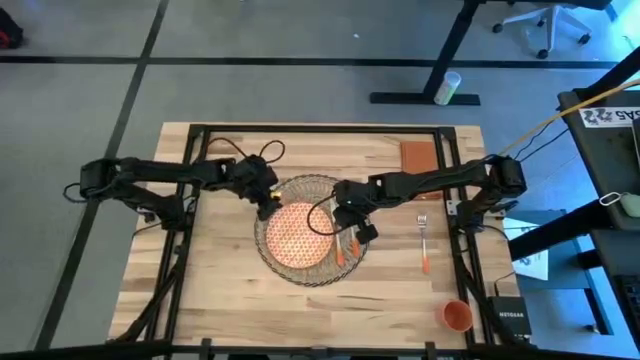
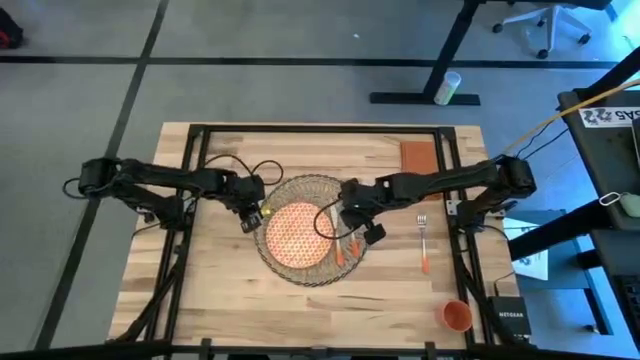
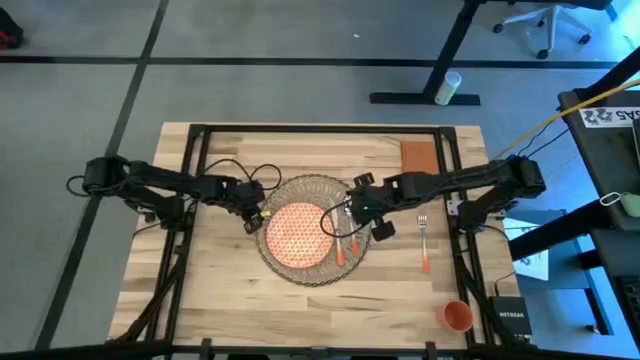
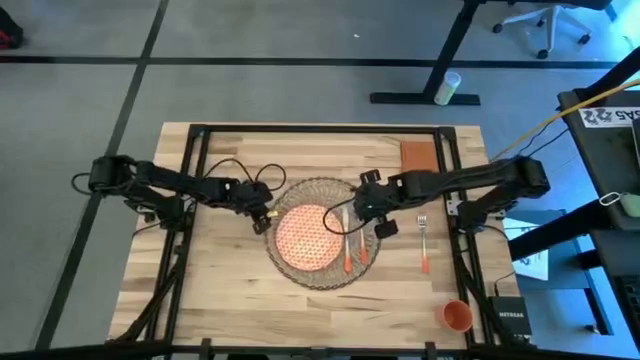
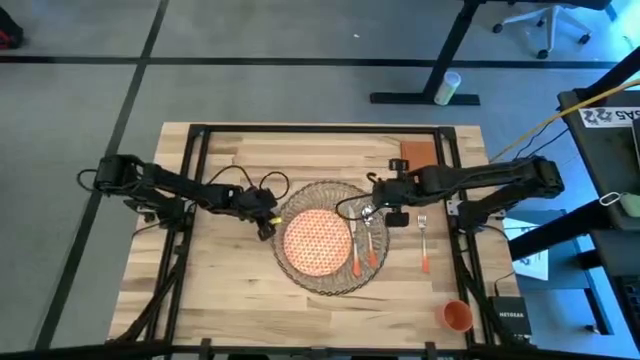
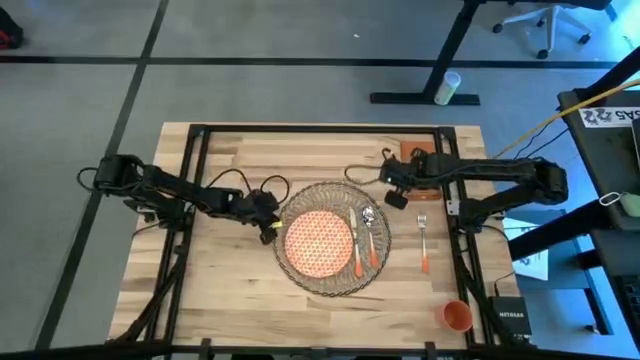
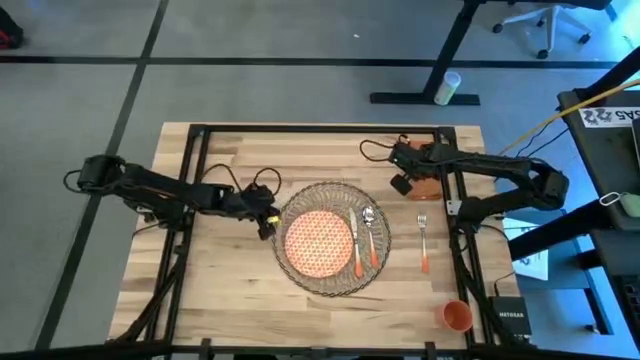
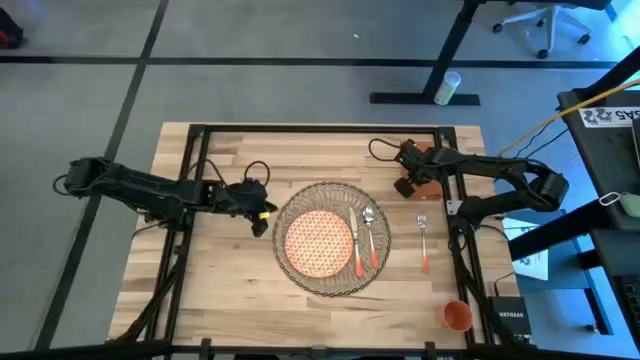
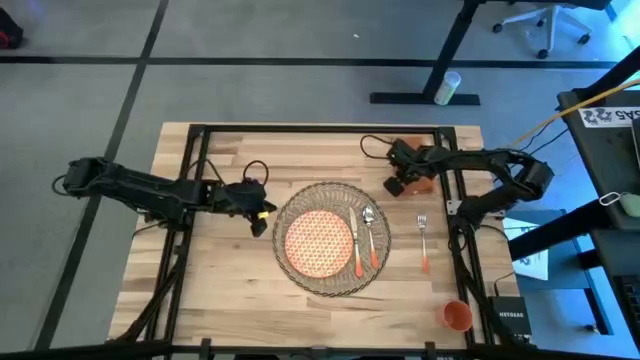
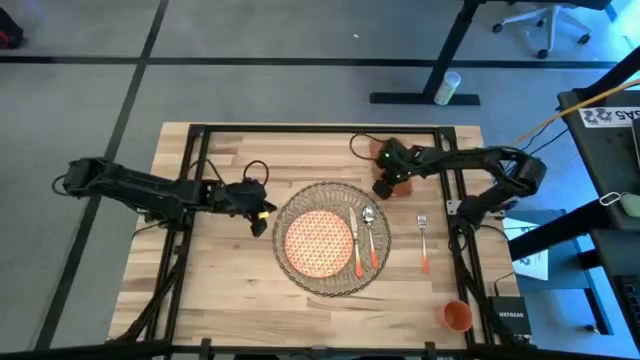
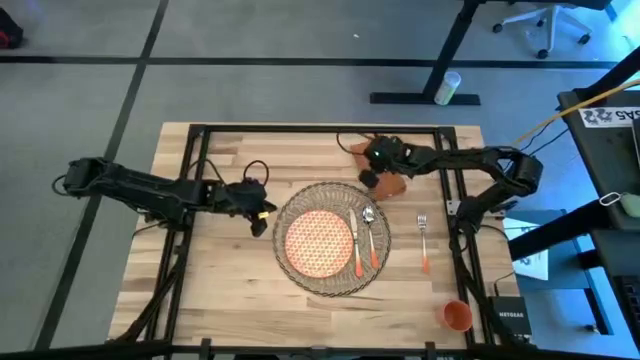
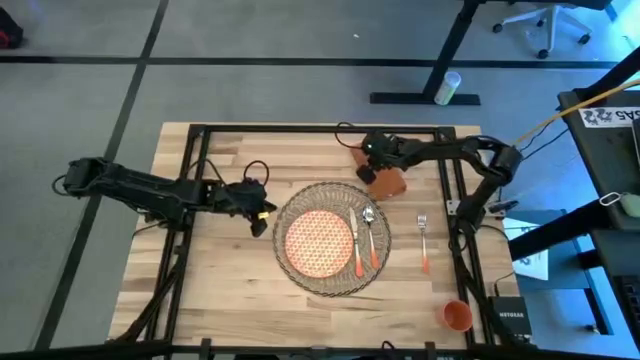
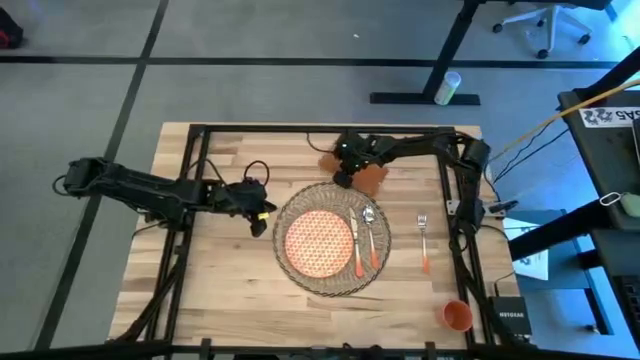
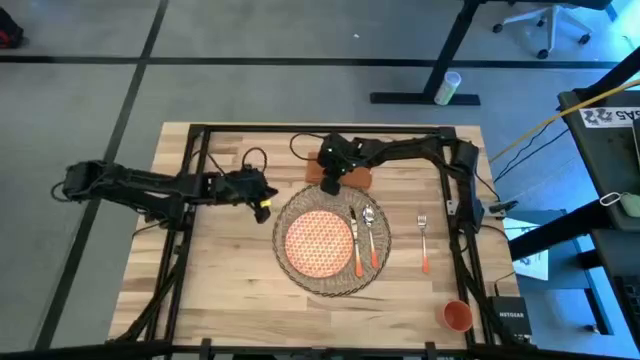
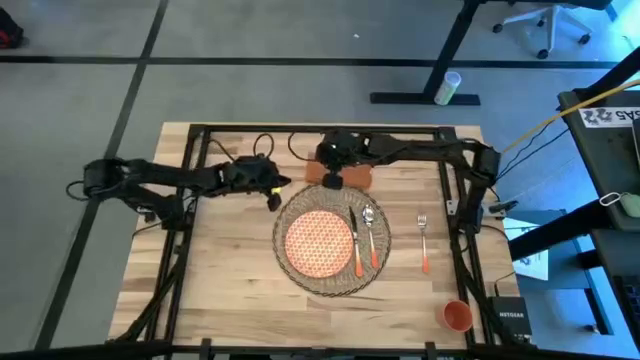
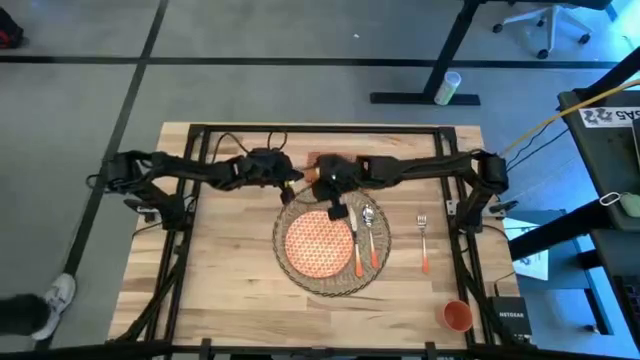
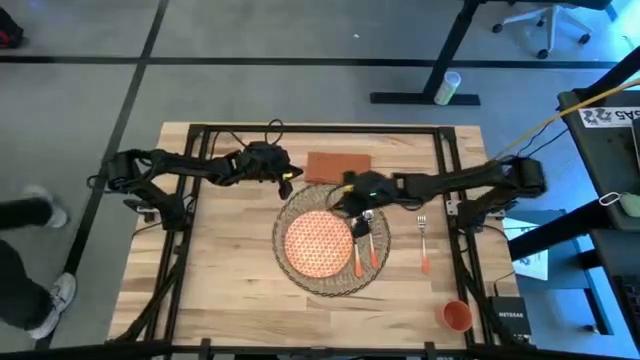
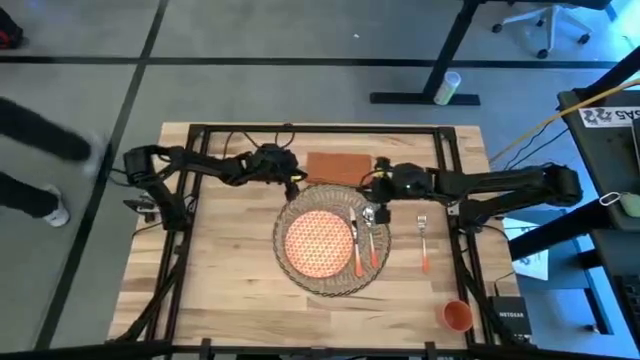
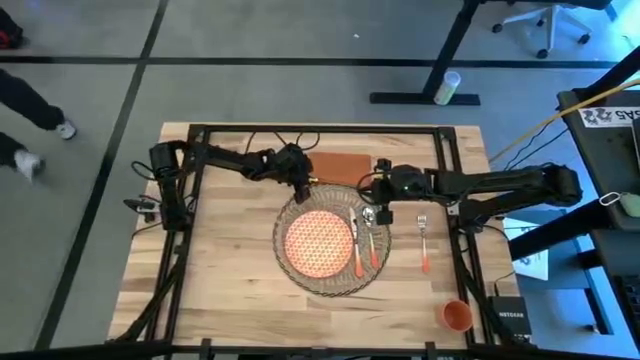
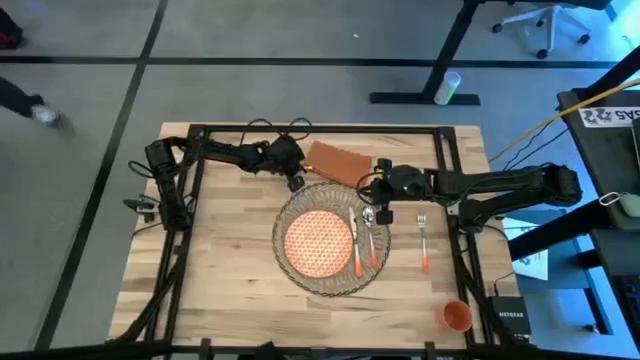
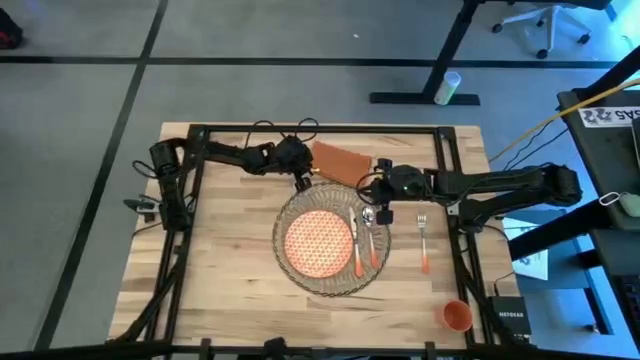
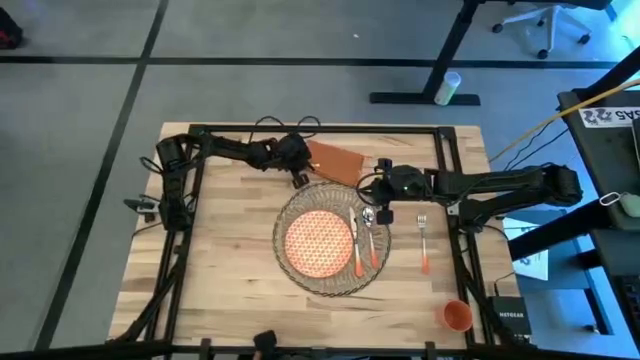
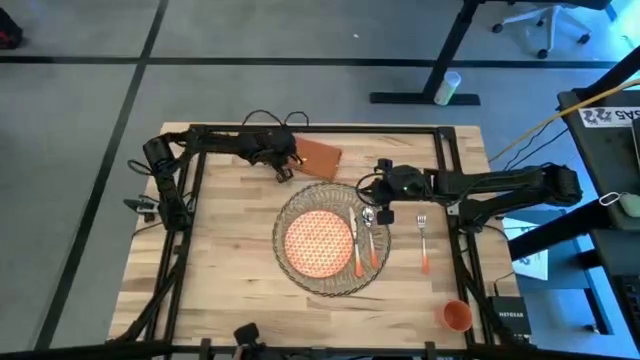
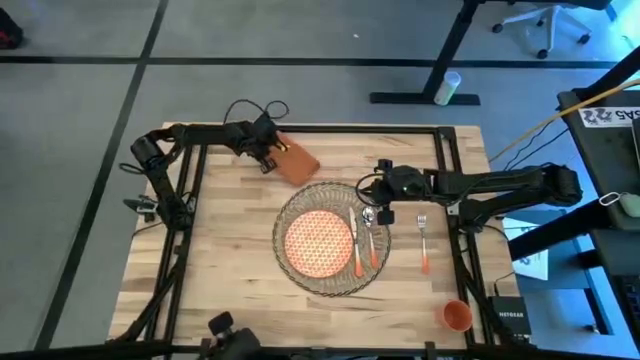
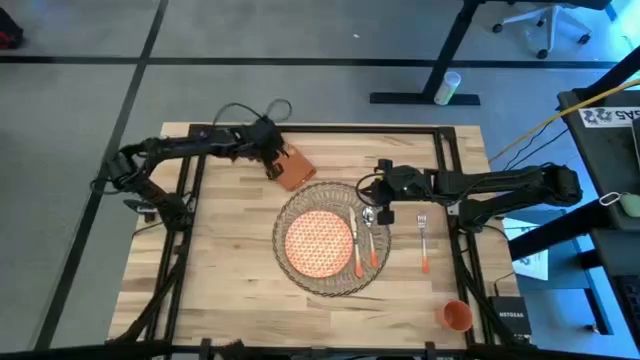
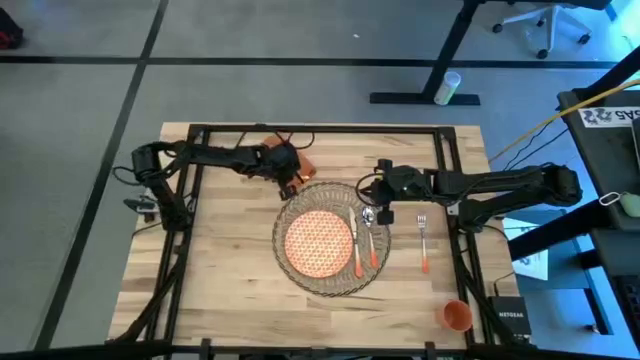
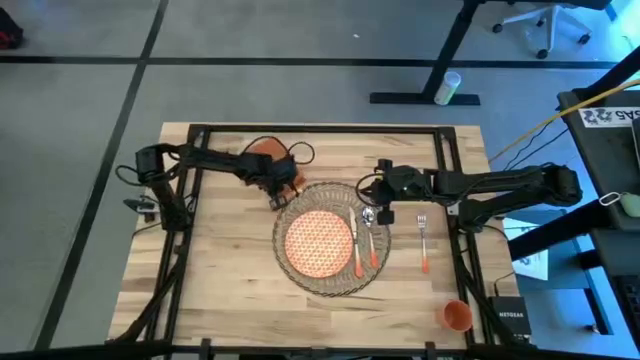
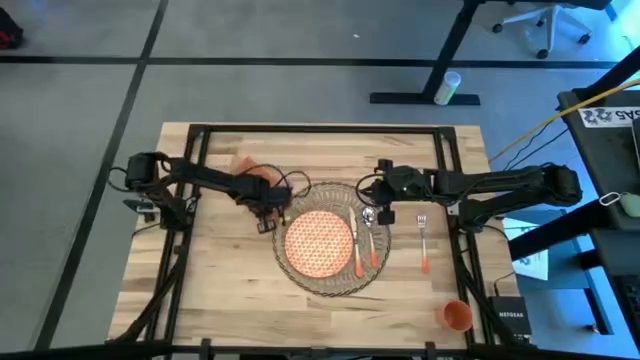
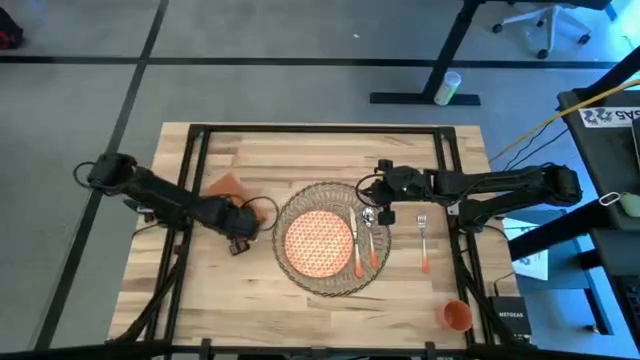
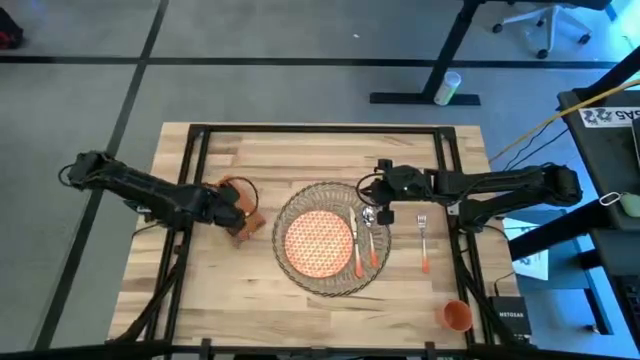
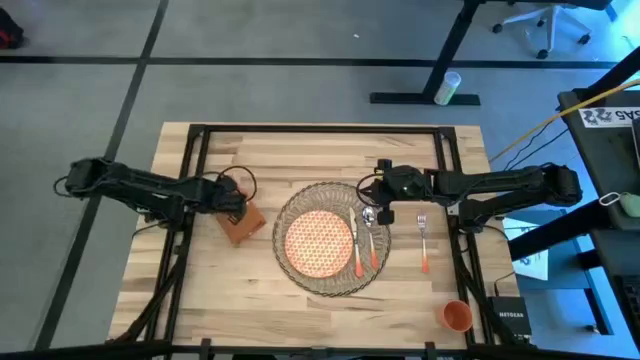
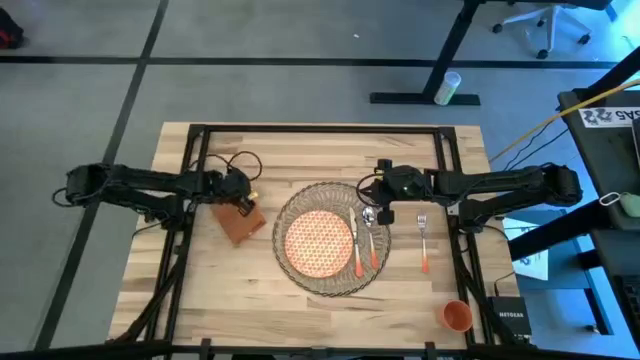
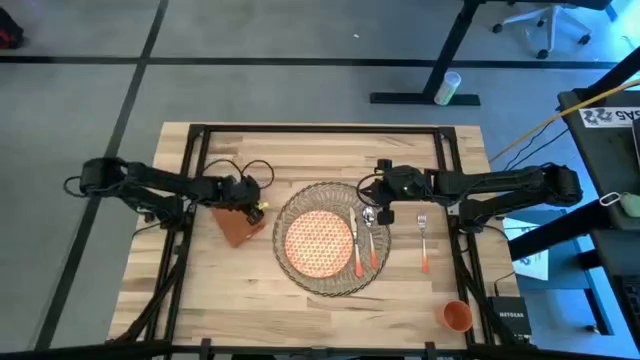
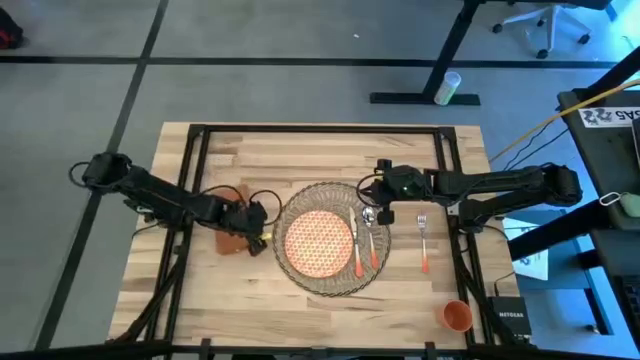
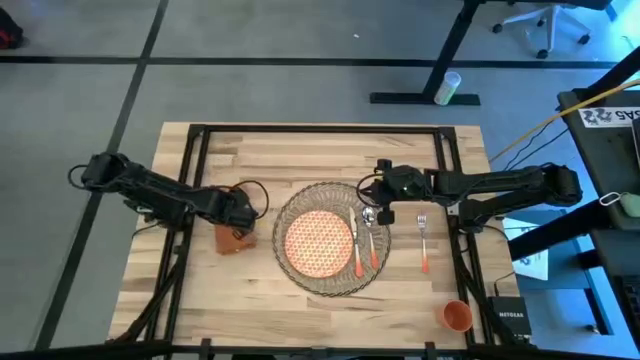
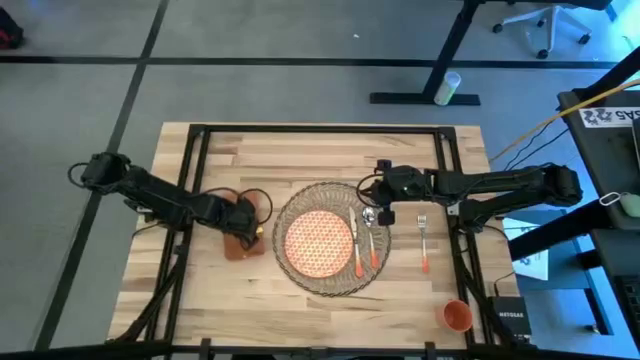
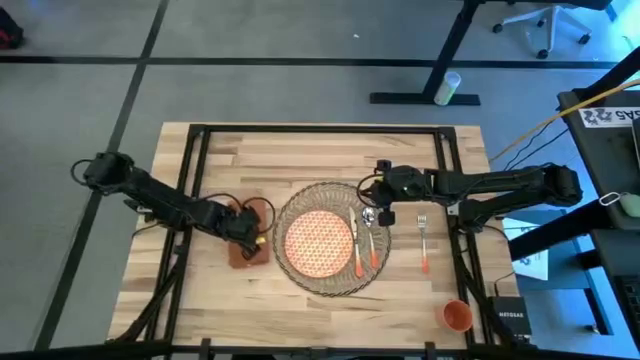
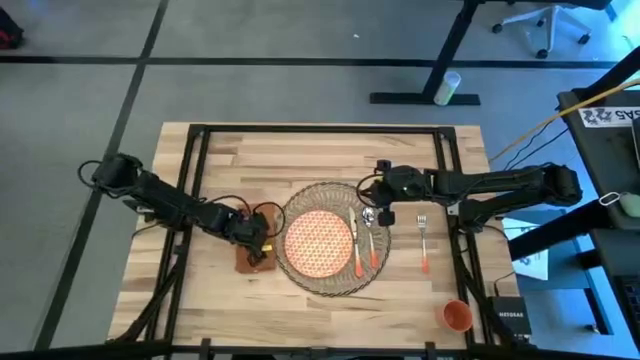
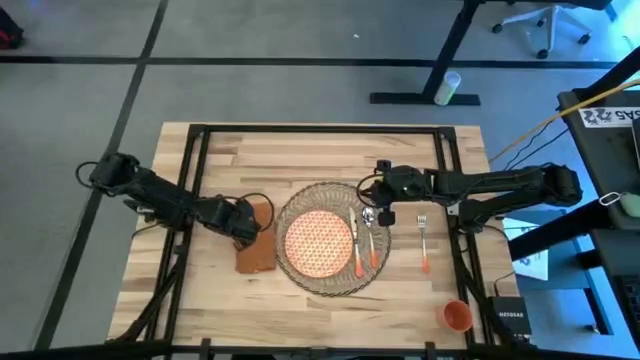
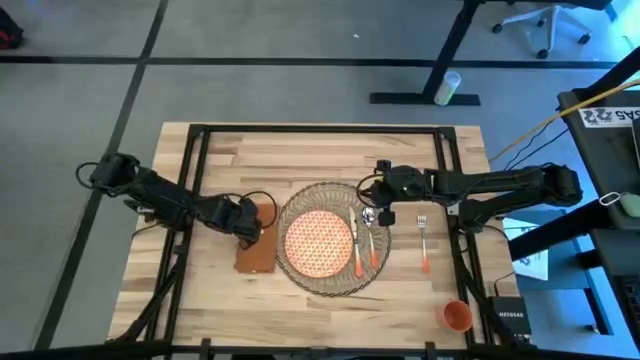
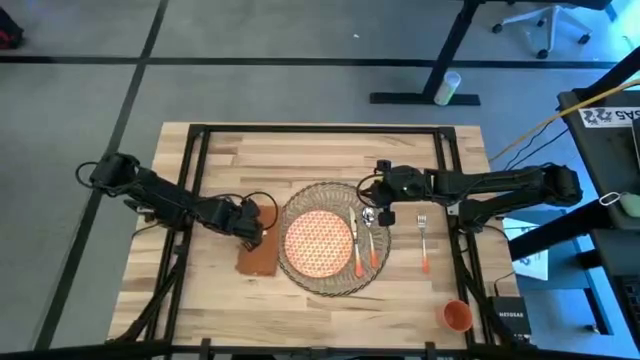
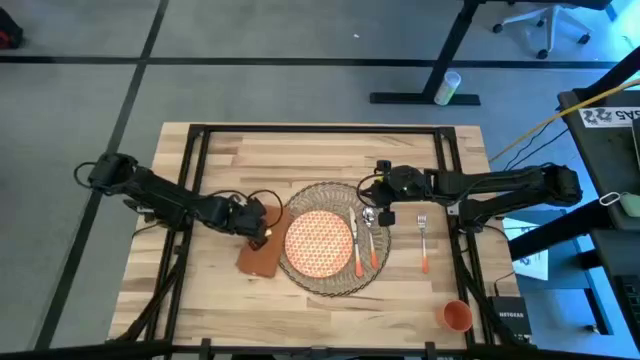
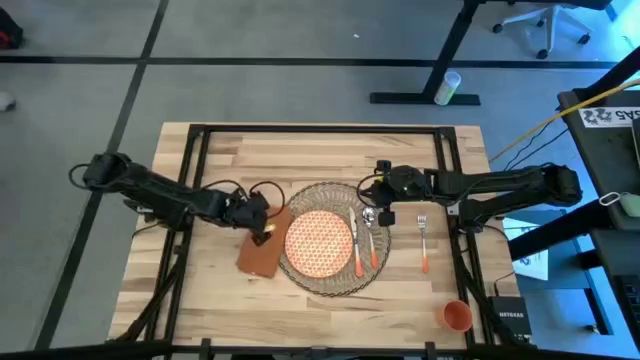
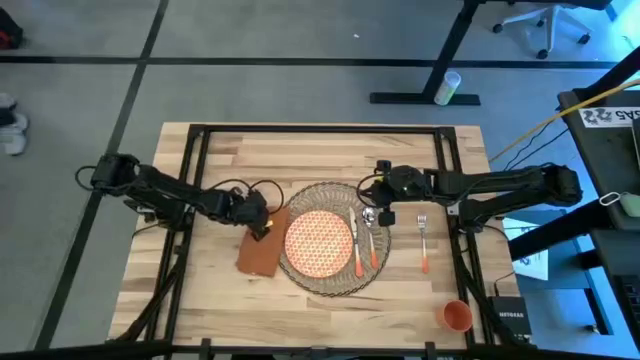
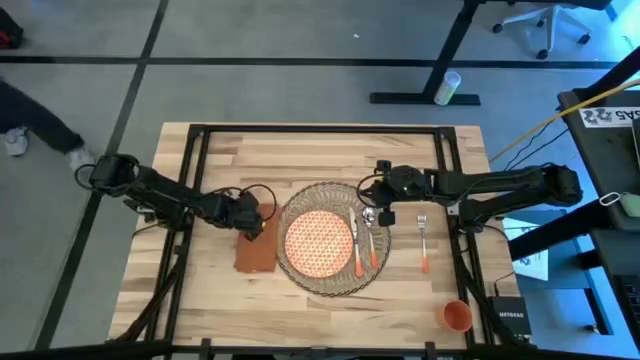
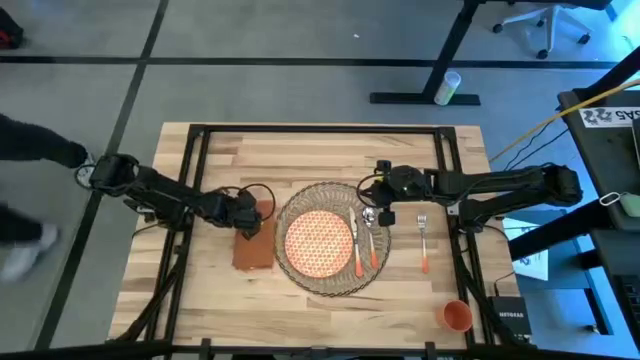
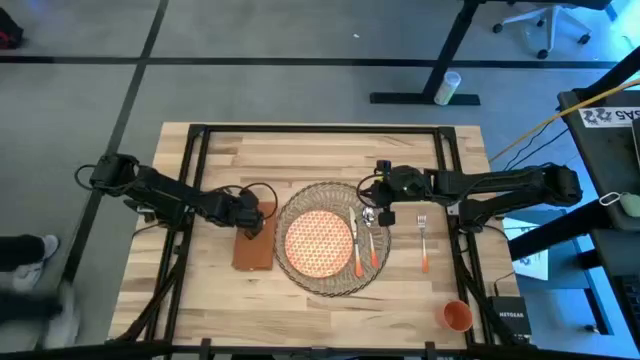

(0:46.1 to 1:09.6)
Task: Set table place
Move the orange table napkin beside the brown woven placemat
